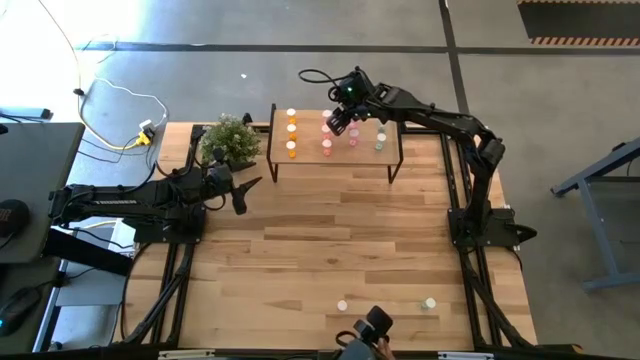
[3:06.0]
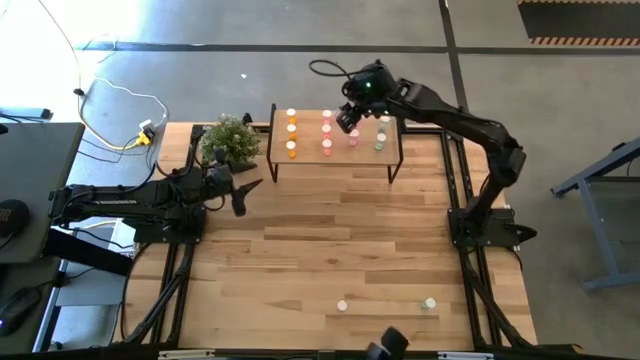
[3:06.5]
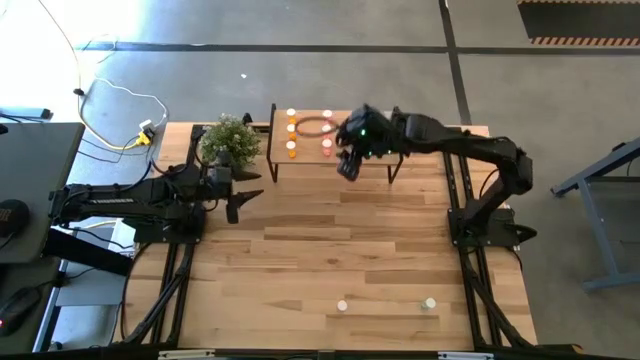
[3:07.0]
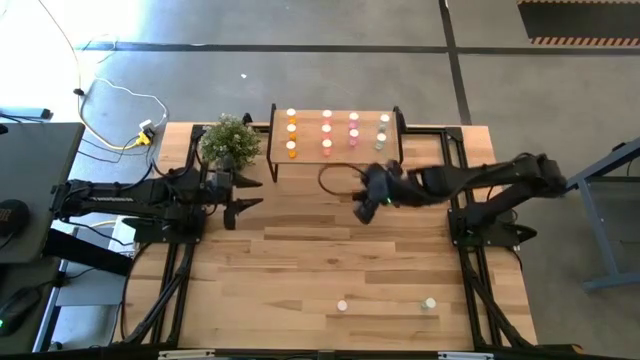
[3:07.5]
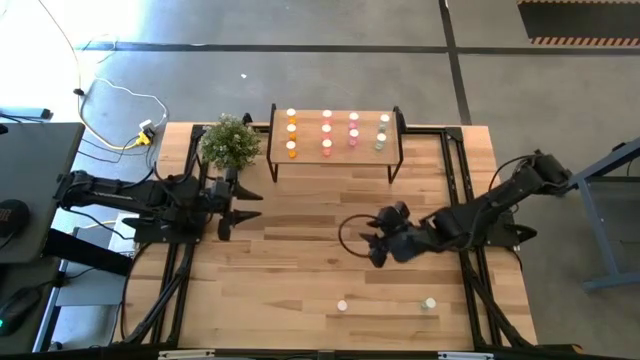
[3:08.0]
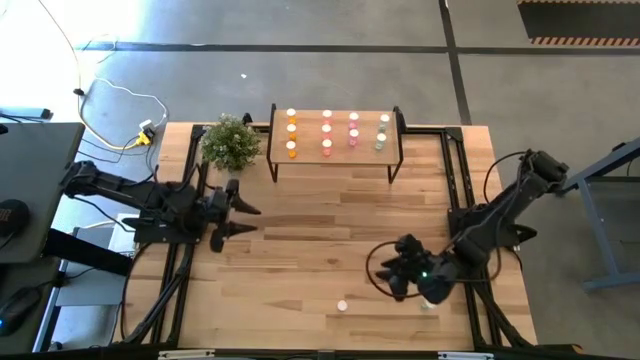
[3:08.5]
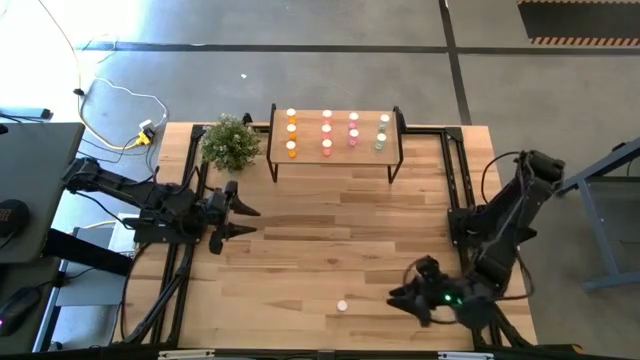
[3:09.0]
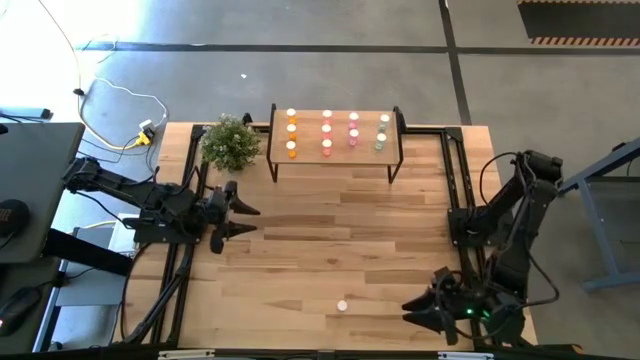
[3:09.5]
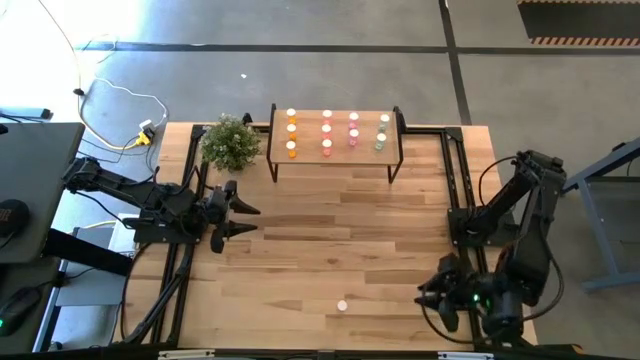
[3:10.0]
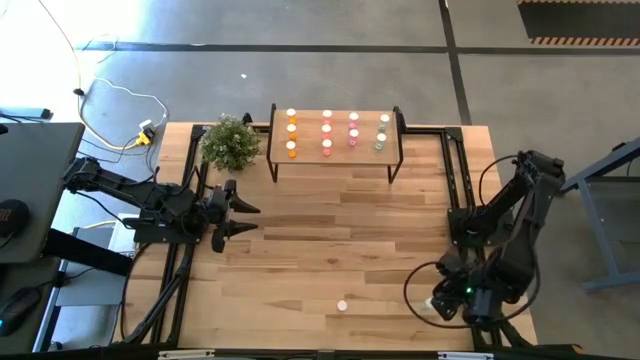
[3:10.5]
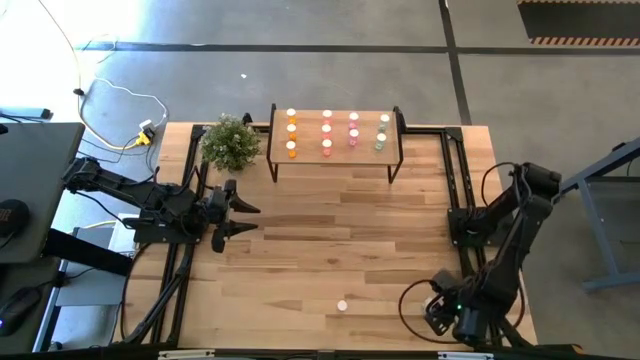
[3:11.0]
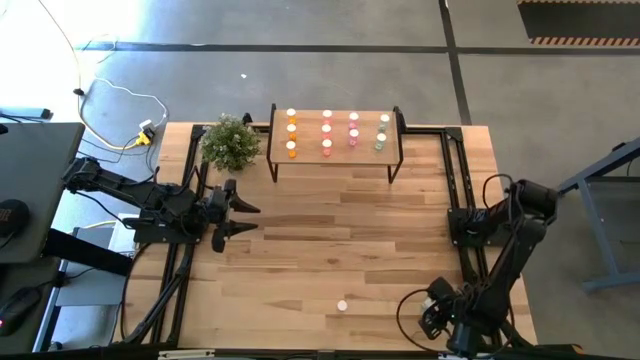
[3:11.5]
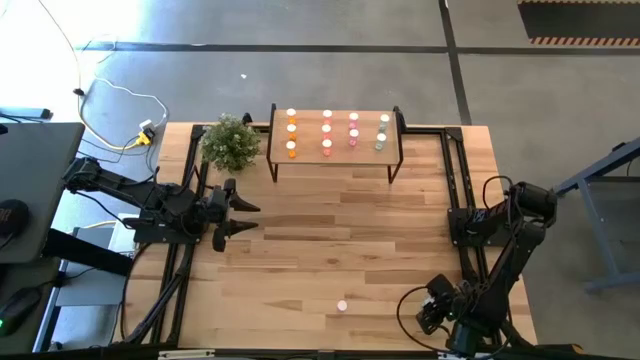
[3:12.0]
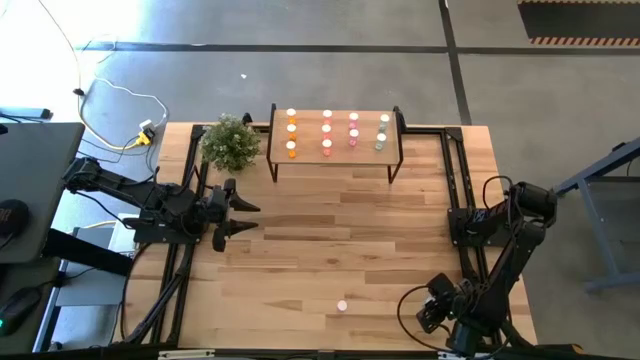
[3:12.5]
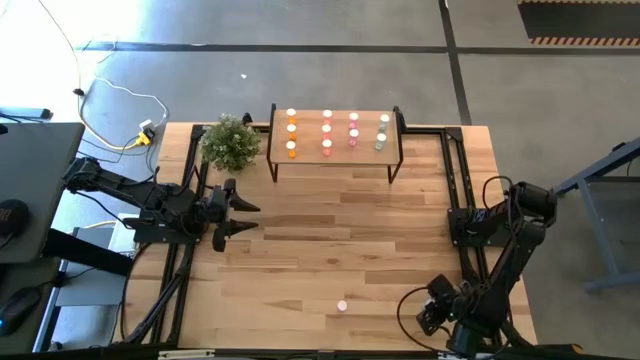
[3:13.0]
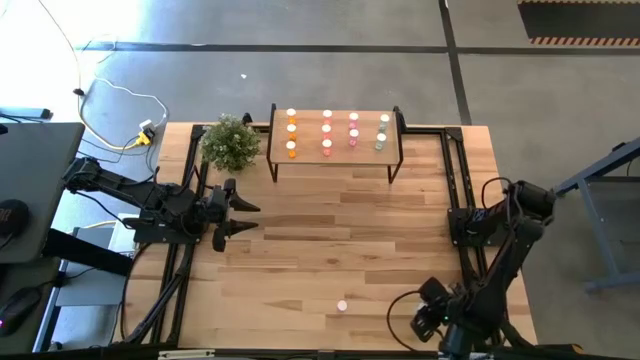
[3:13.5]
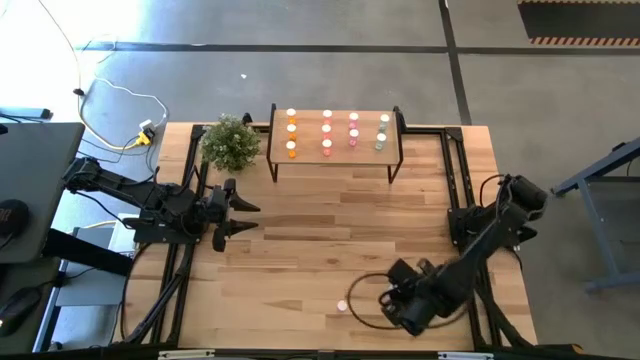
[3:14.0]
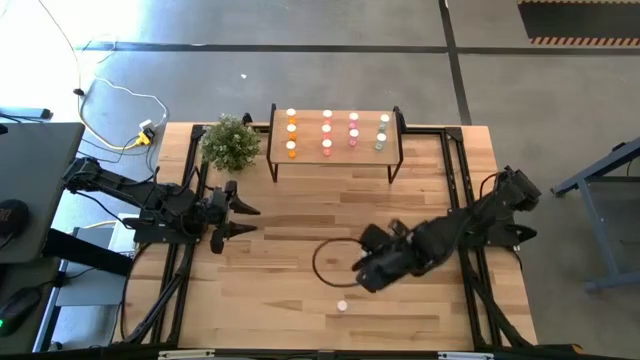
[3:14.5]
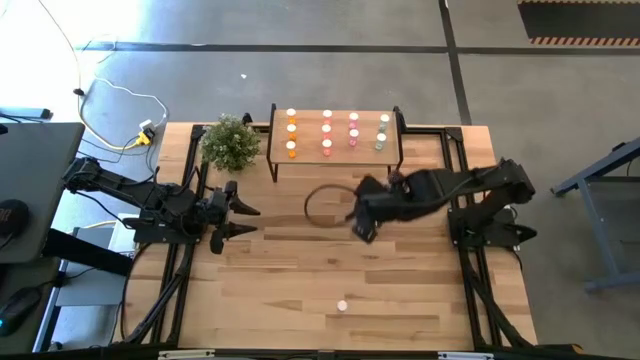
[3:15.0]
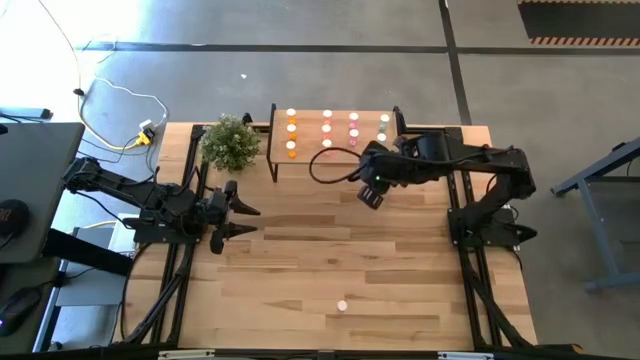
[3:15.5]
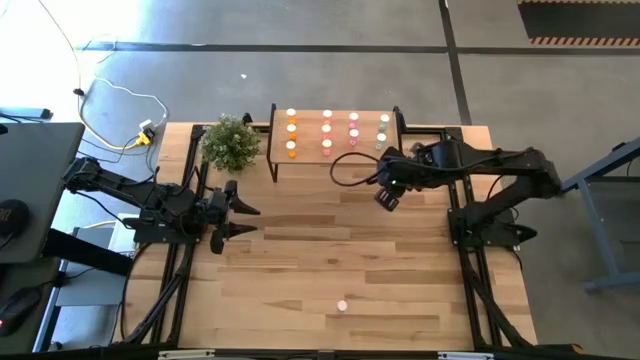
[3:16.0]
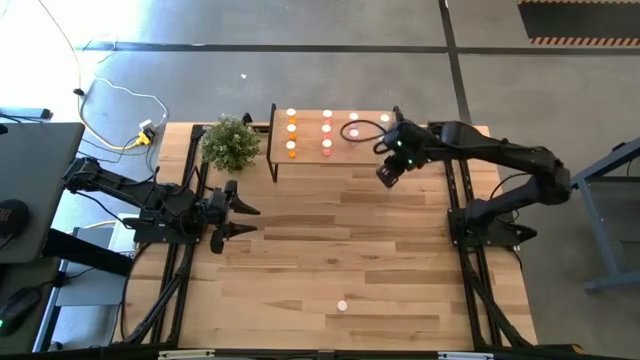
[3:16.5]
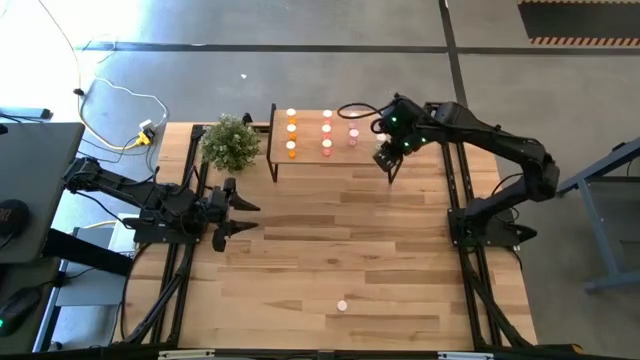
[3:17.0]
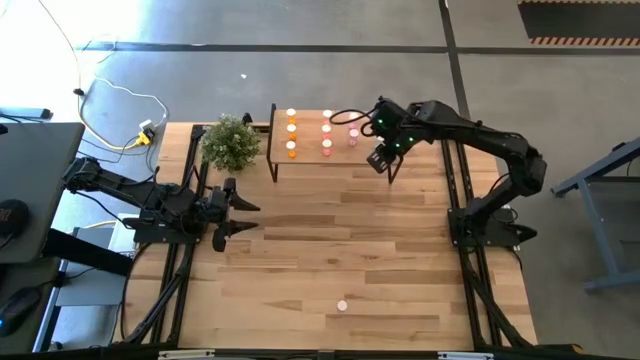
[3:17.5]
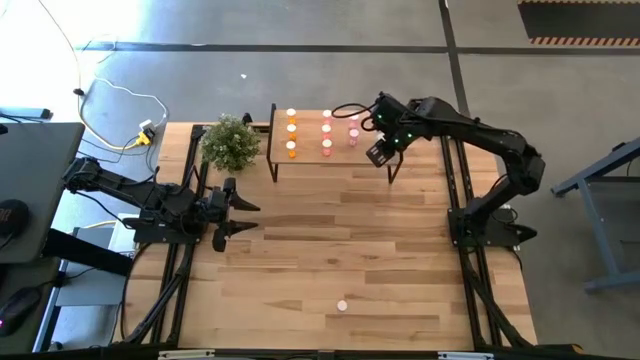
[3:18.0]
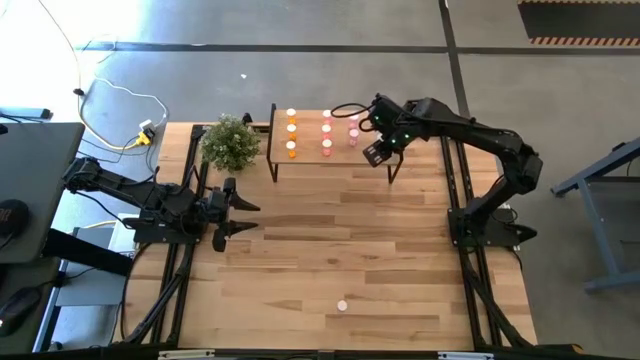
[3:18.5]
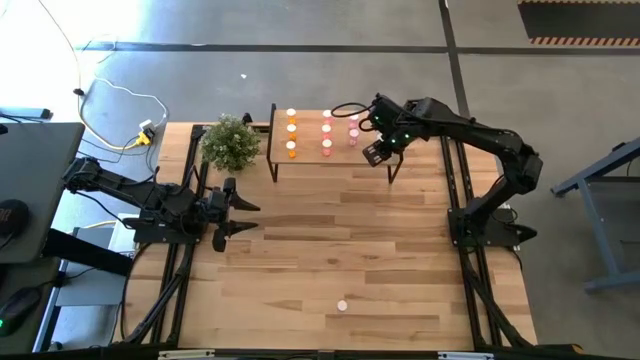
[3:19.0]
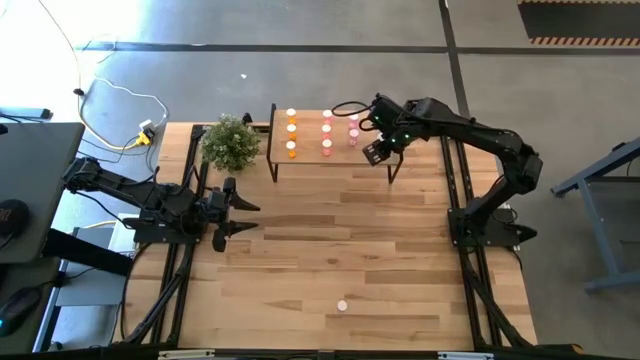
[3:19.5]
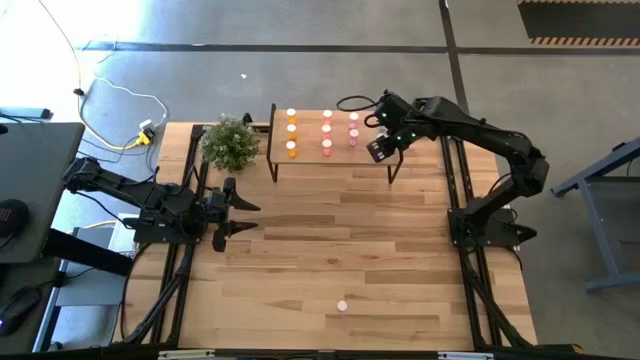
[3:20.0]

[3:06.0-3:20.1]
Task: Pick and place medicine bottles onto shelf by color
Put the green pill bottle aligned with the other green pill bottles on the shelf

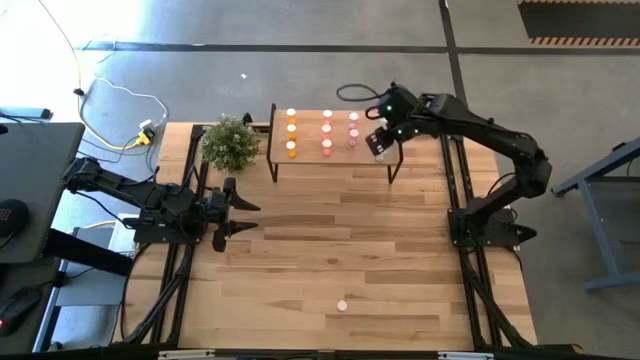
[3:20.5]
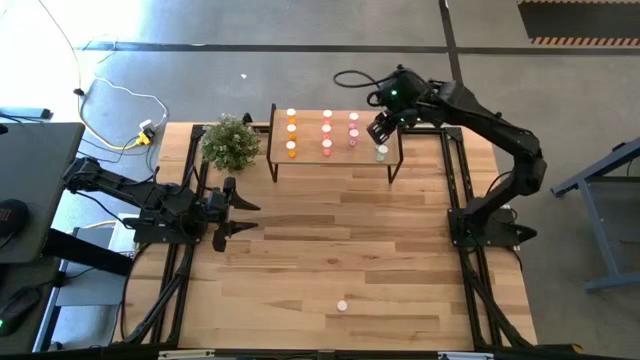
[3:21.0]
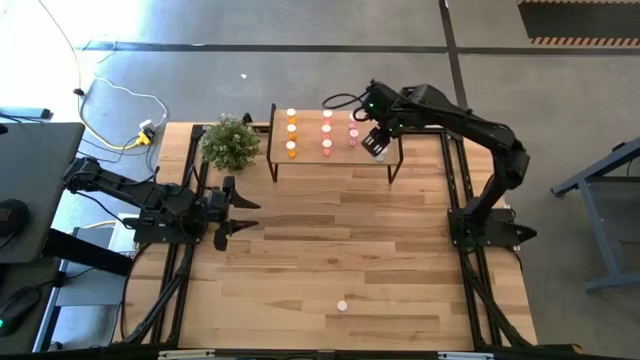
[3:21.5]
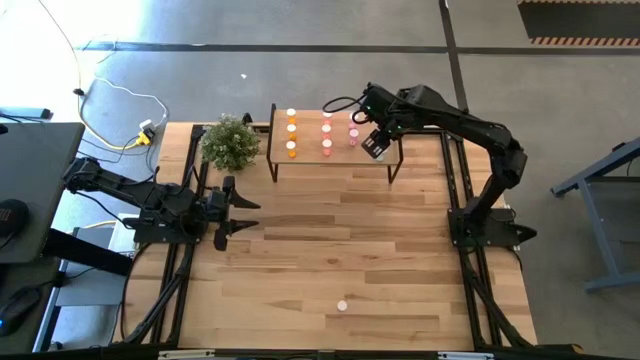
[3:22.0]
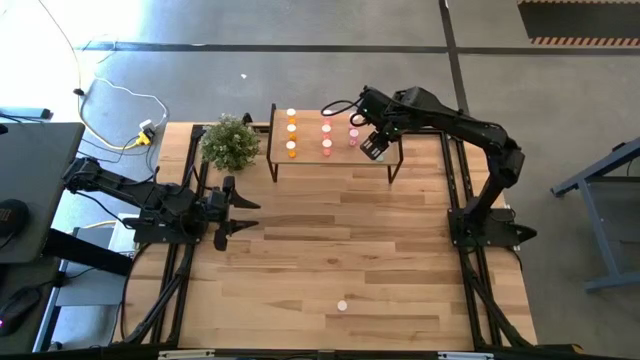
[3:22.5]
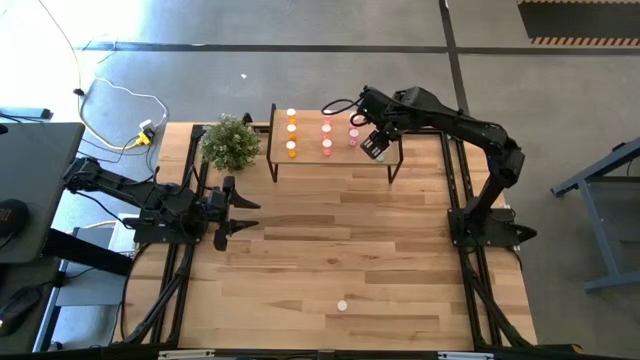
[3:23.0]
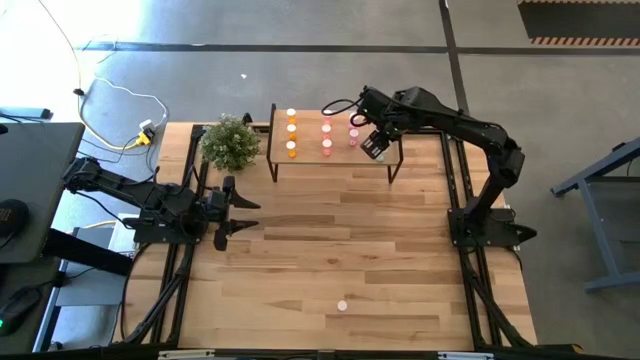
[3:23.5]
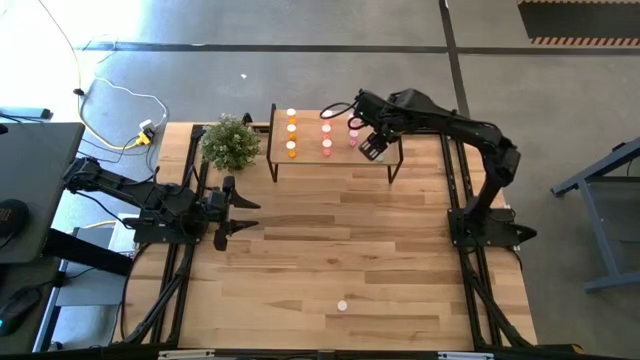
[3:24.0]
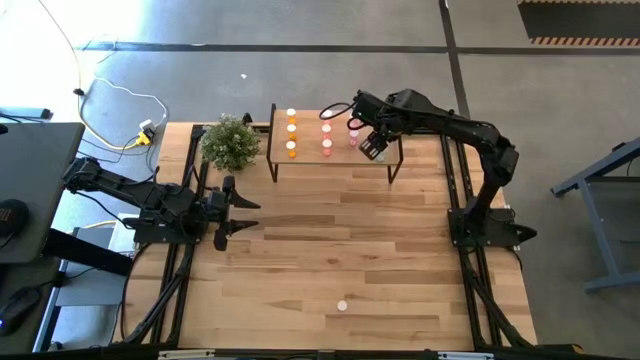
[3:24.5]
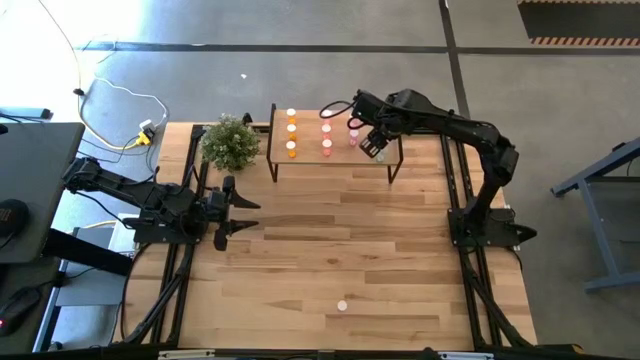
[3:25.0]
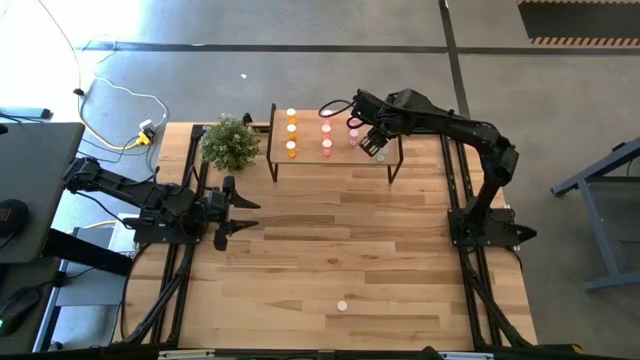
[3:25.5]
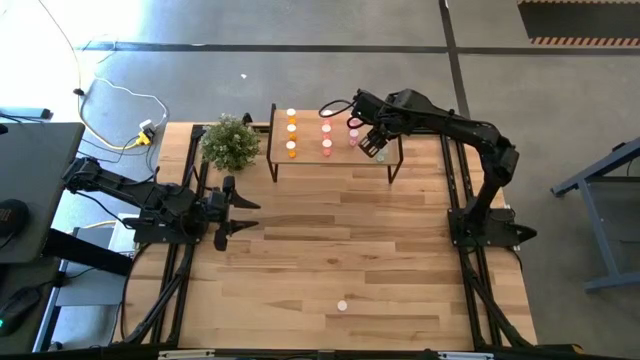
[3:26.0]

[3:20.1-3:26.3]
Adjust the green pill bottles on the shelf

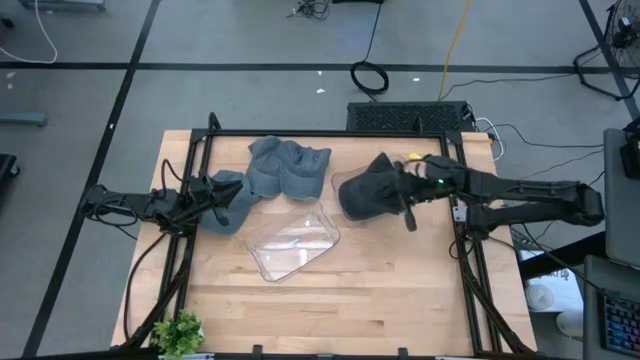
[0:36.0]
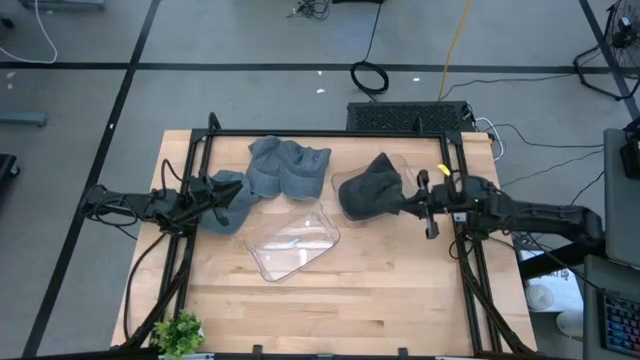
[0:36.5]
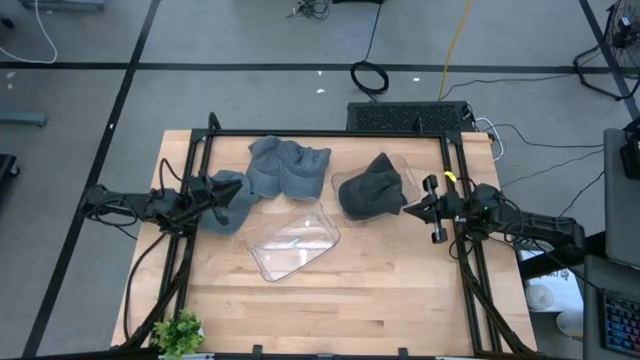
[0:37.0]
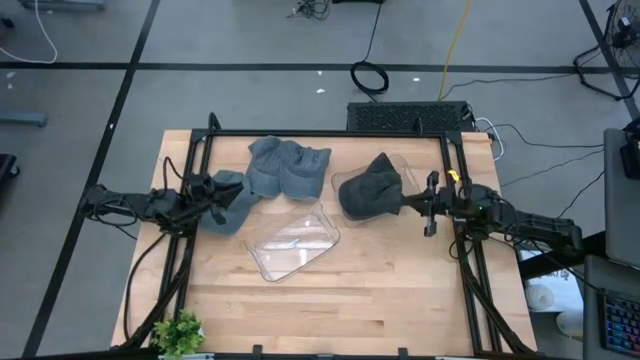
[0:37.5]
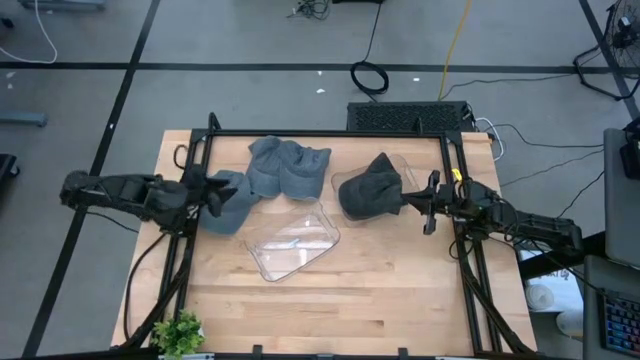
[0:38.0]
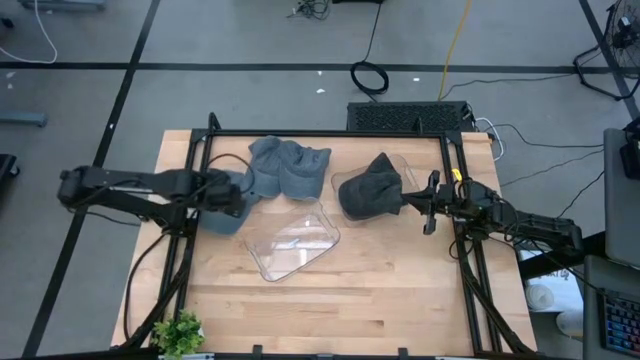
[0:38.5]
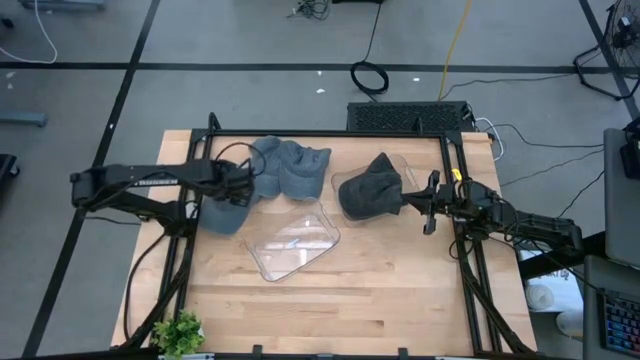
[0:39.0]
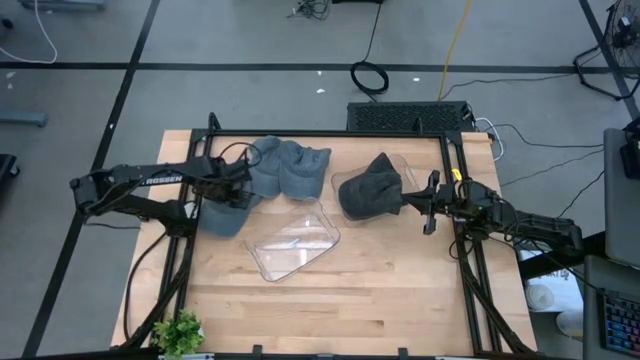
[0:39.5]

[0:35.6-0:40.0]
Task: Pick & Place hat
Put the bottom blue cap into the bottom transparent bin
